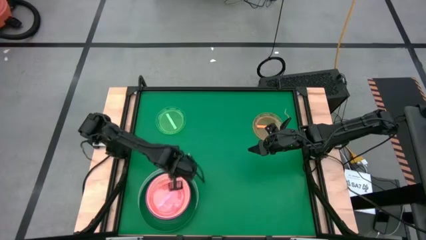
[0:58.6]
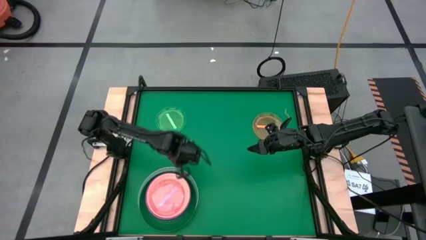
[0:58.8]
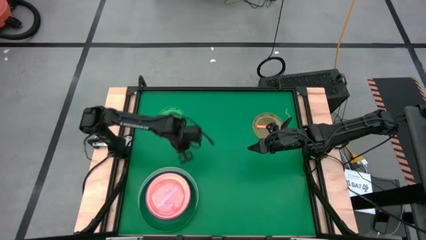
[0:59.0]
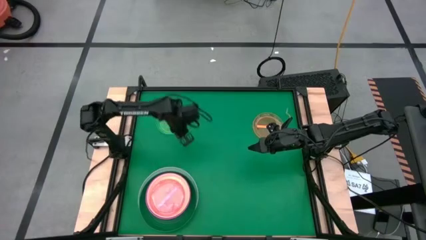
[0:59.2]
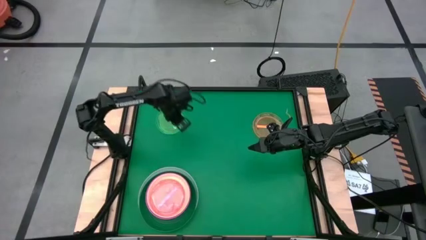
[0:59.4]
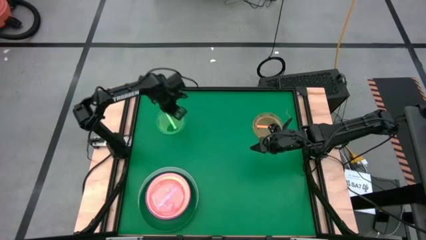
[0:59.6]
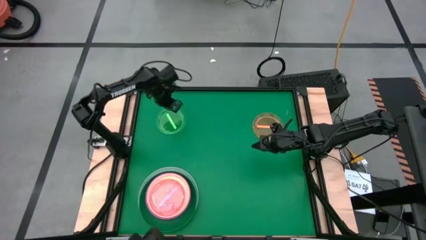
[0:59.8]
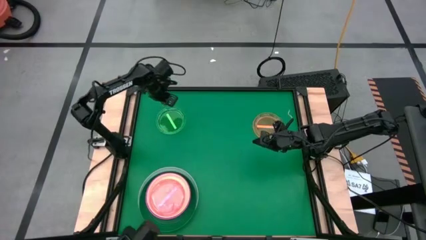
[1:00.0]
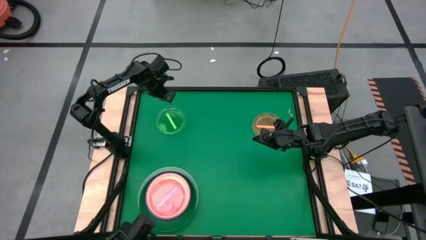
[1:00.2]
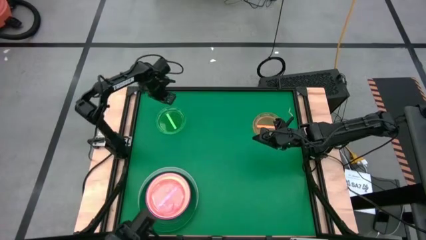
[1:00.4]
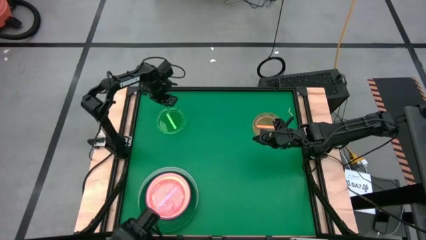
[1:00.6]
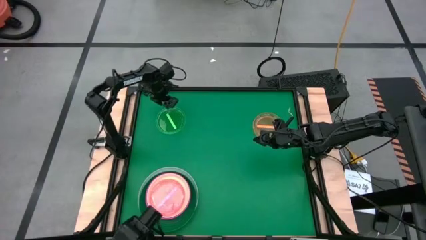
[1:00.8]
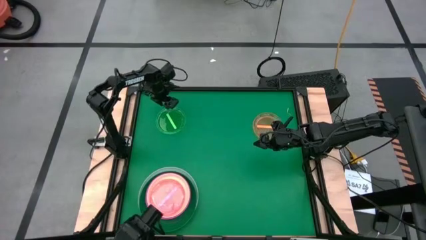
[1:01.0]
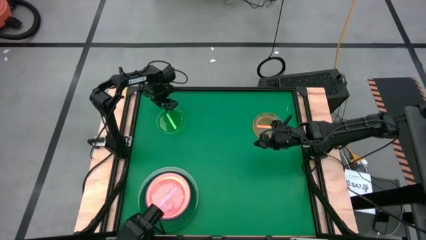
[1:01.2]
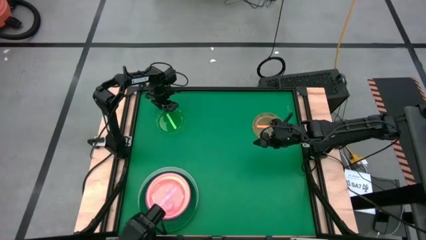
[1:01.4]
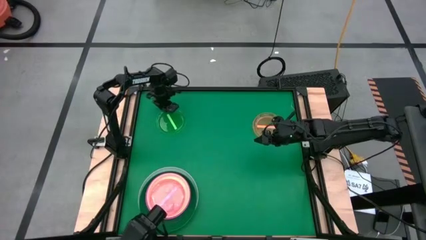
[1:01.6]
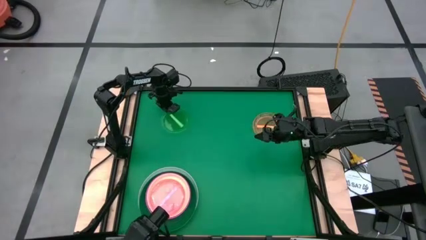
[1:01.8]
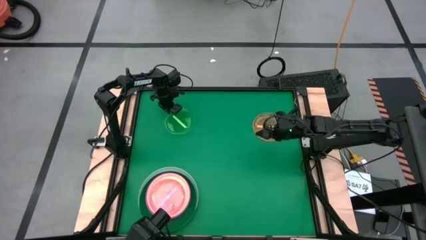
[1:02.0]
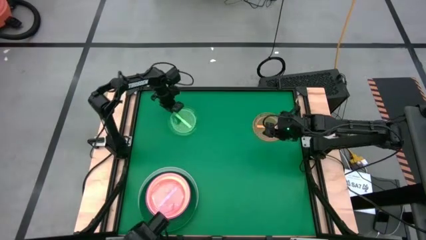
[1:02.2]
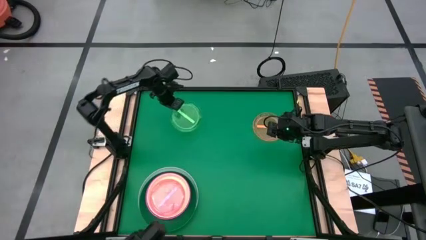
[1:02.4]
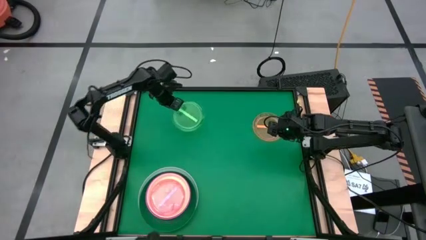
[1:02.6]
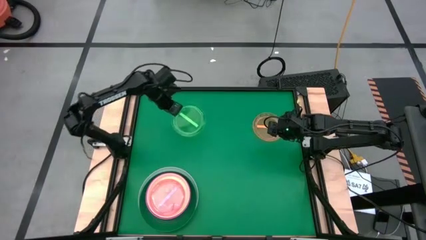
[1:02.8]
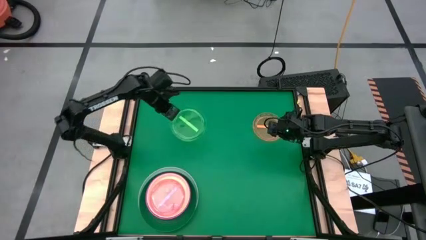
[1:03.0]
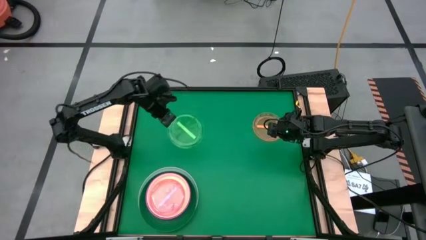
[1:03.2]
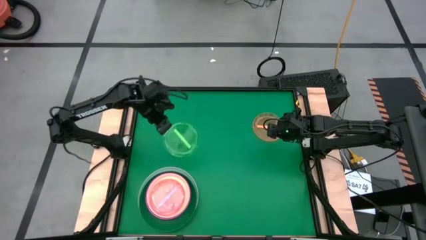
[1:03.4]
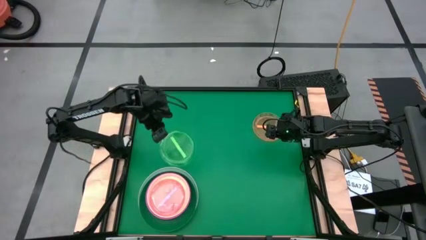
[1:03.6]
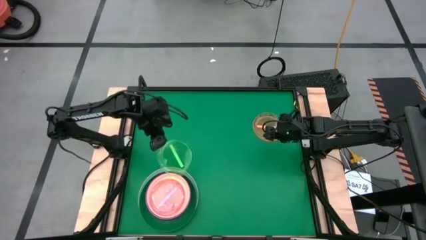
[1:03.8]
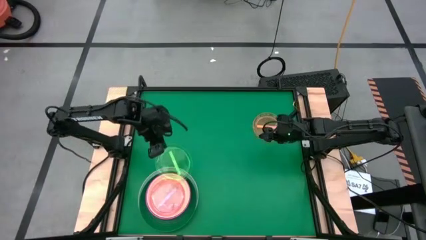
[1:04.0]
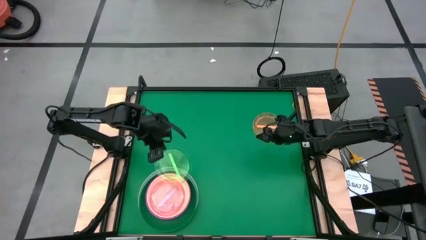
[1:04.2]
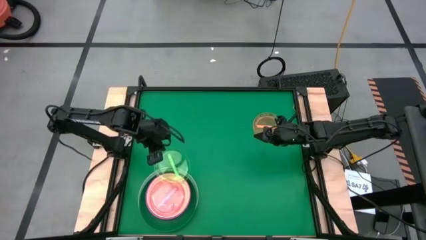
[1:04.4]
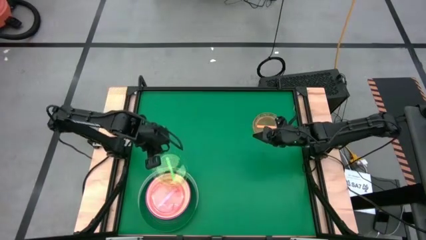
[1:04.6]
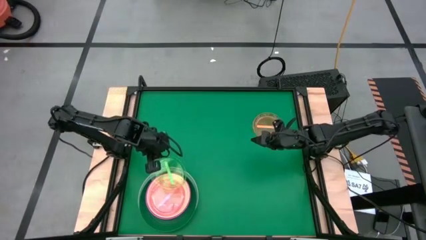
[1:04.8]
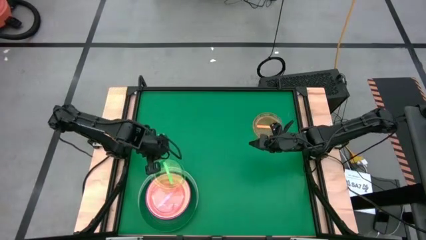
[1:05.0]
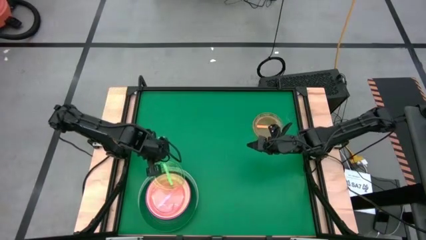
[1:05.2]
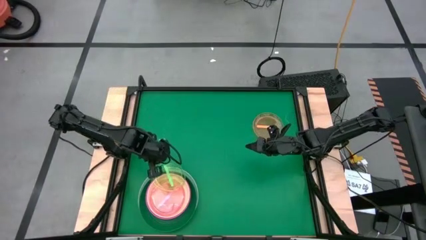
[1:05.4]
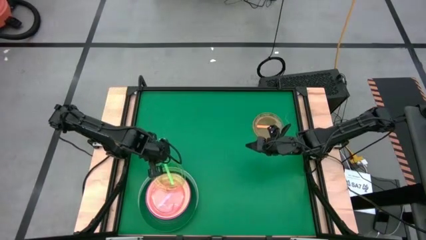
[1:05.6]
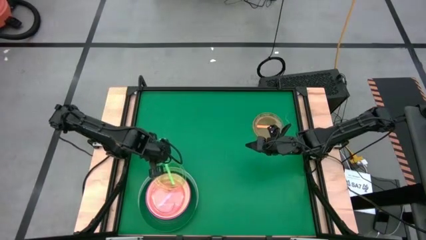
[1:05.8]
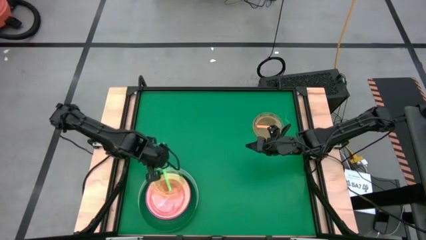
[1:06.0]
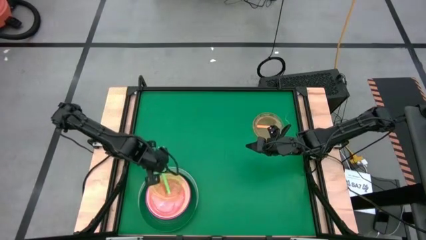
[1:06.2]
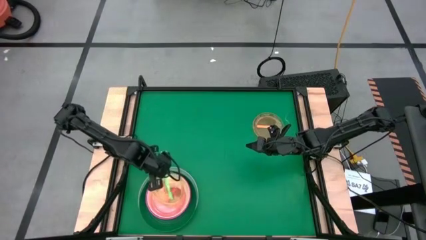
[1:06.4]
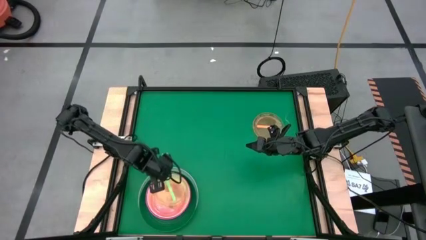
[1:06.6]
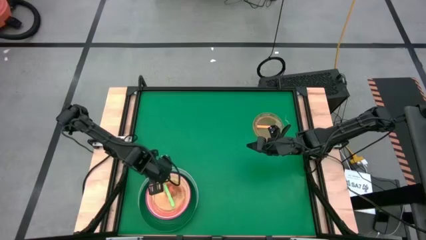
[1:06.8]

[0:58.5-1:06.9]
Task: Stack plastic plates
Stack the small green plate on top of the small pink plate

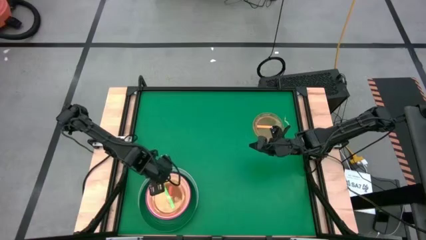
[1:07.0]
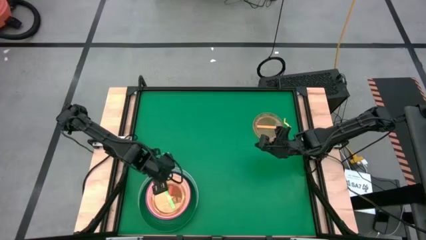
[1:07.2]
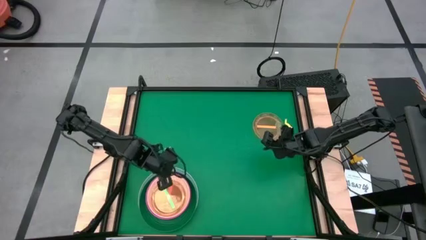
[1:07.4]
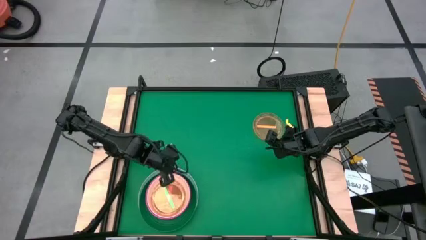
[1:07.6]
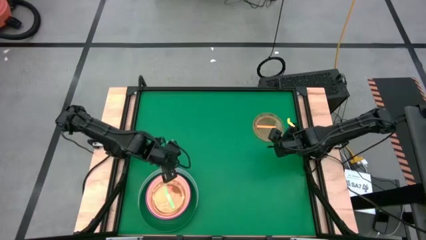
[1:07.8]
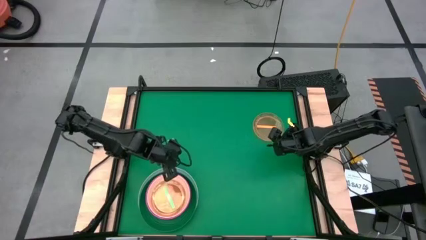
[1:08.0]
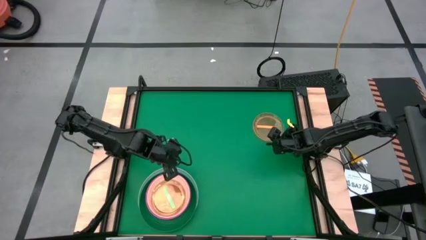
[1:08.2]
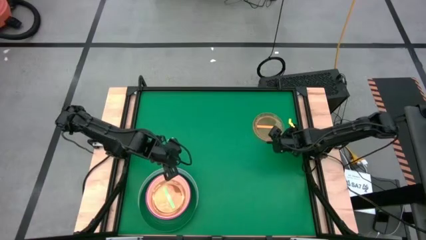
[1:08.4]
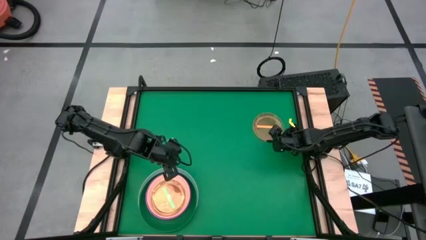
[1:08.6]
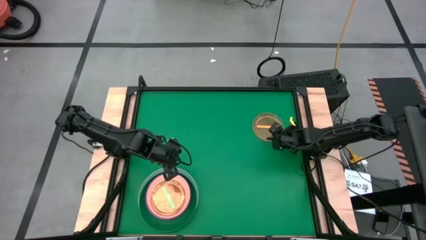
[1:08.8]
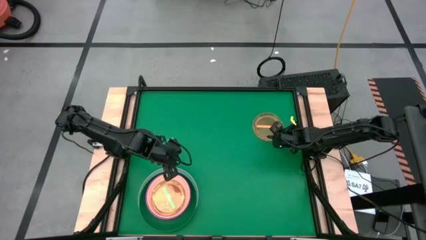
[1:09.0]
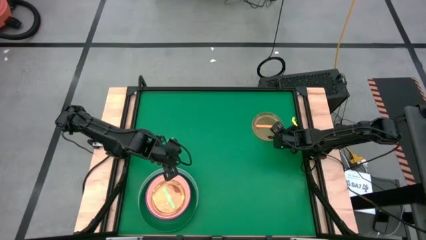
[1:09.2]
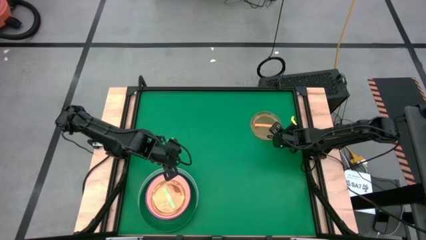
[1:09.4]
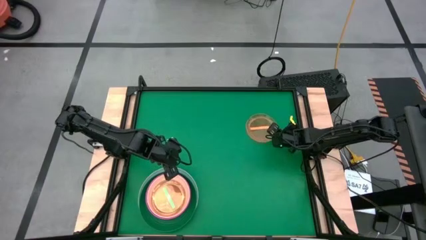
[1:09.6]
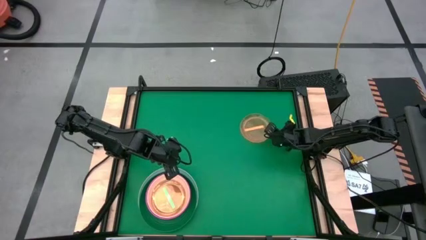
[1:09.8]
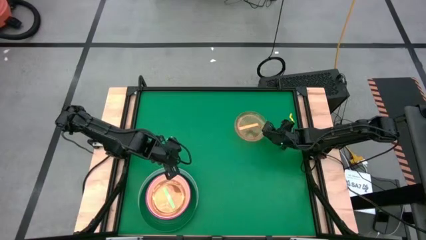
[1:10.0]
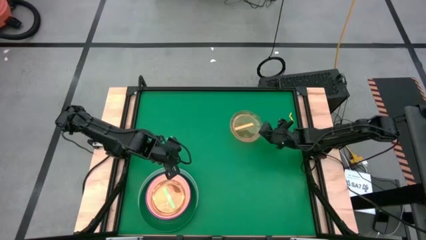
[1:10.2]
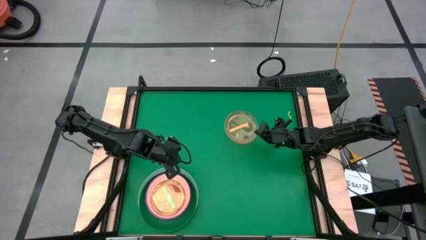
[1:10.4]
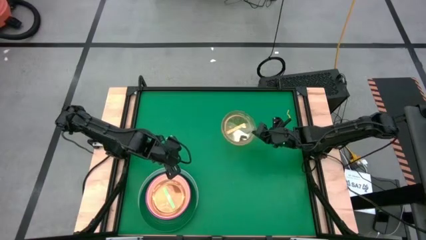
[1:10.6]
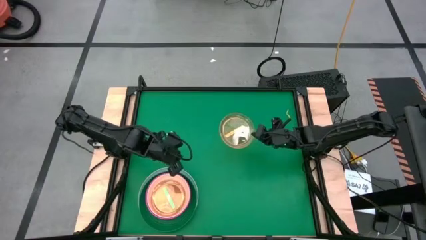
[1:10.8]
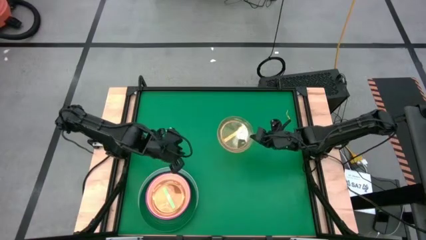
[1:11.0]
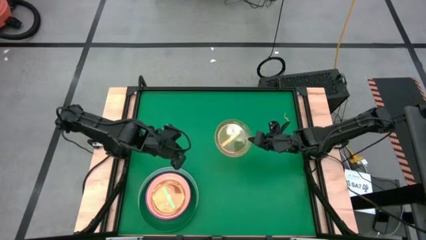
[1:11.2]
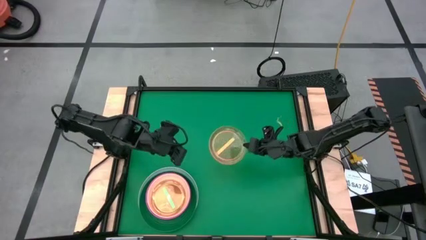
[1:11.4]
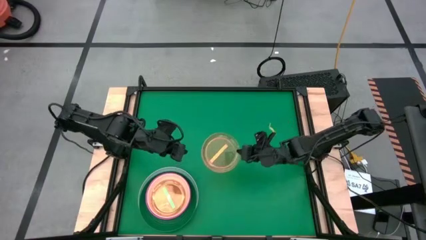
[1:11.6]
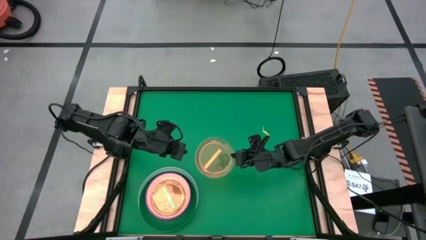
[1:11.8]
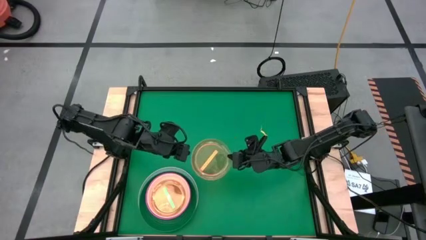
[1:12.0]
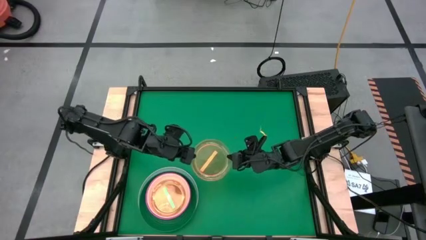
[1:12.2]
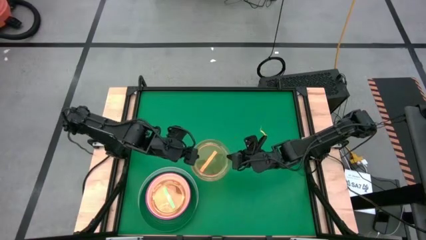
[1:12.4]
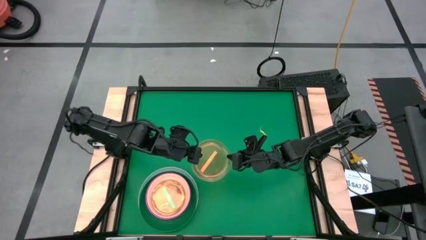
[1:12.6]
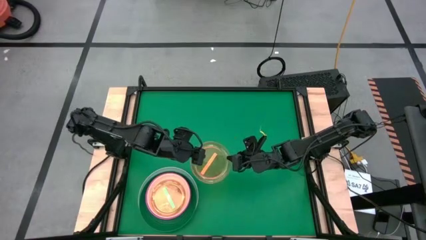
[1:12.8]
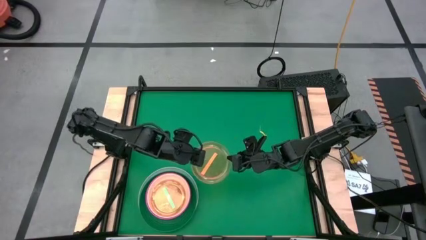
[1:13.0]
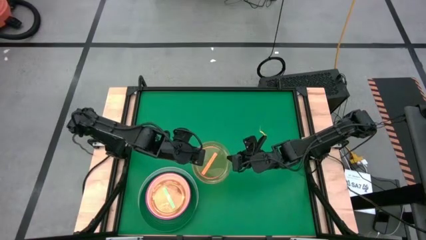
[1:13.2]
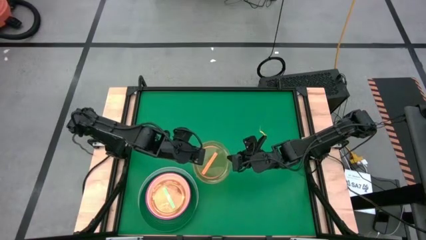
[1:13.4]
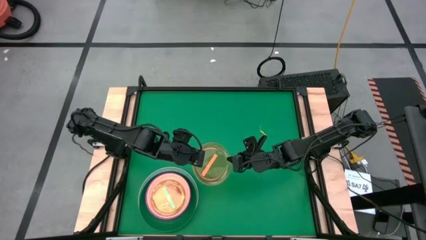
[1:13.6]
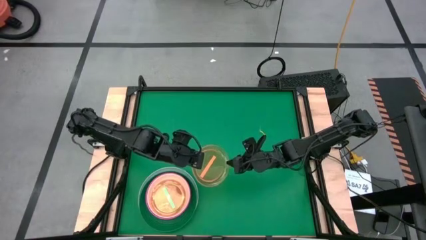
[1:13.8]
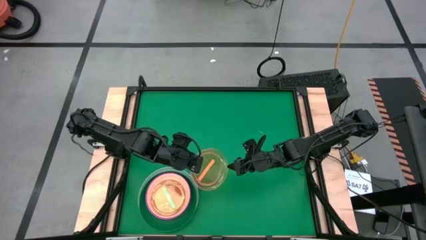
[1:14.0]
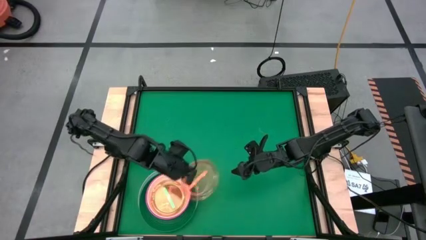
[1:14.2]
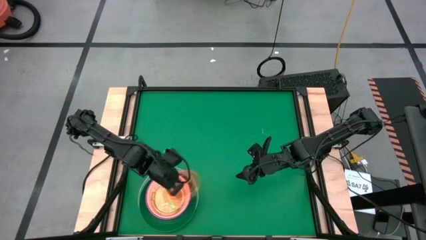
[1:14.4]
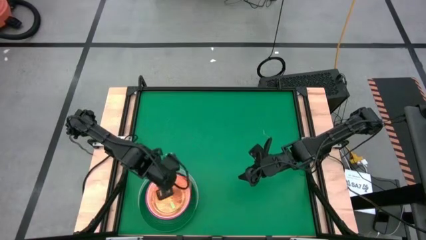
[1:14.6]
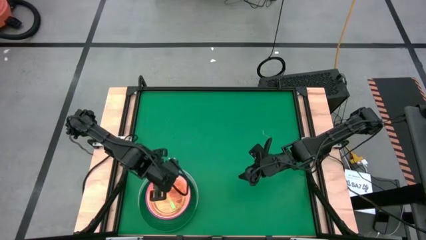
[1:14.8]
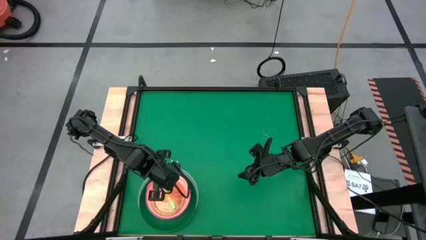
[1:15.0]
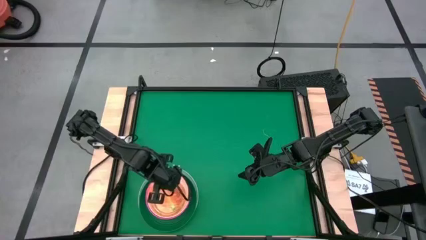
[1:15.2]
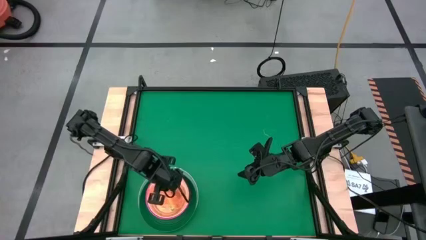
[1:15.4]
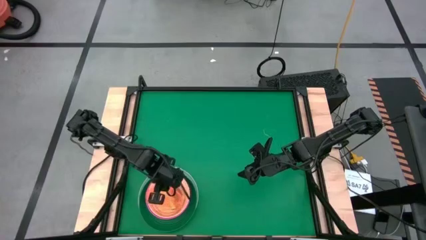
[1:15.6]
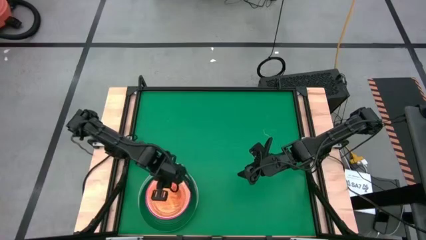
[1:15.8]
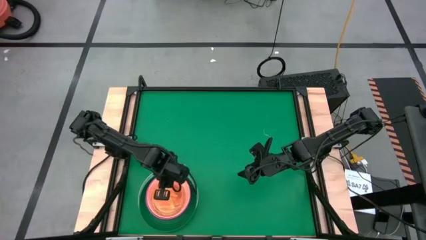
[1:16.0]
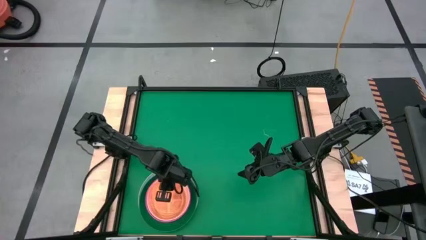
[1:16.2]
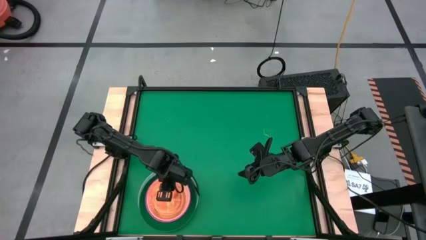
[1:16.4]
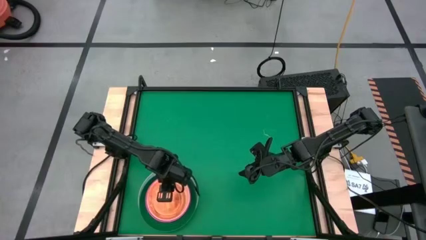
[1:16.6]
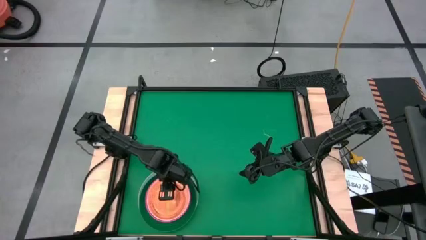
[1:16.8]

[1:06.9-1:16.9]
Stack the orange plate on top of the small green plate
